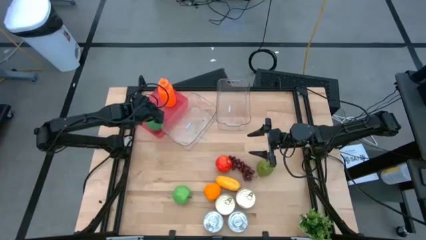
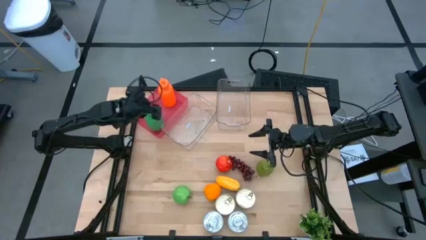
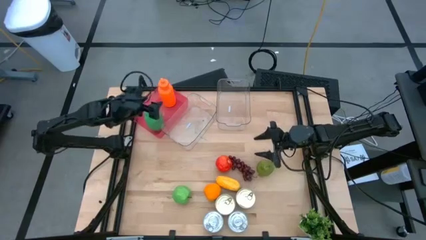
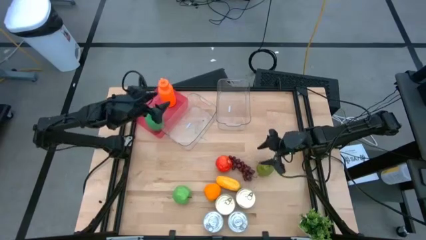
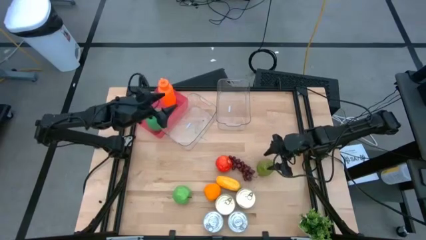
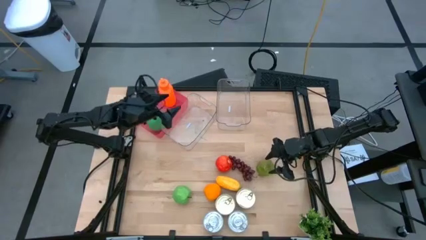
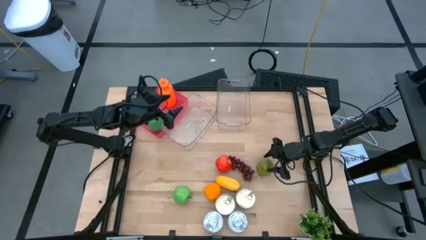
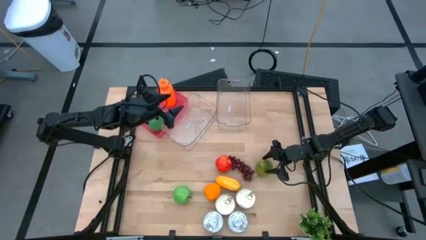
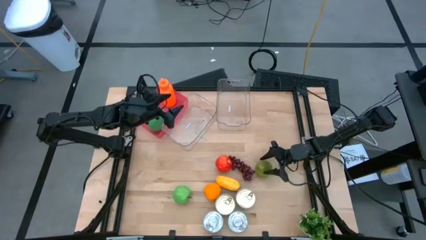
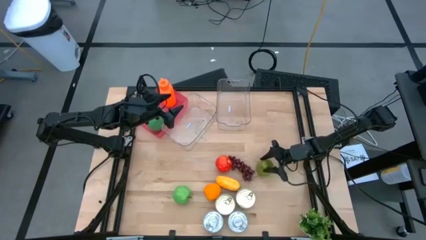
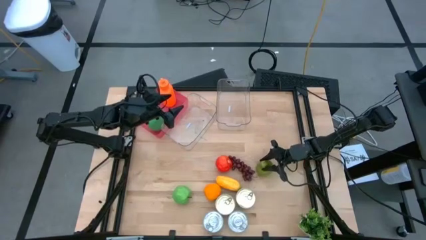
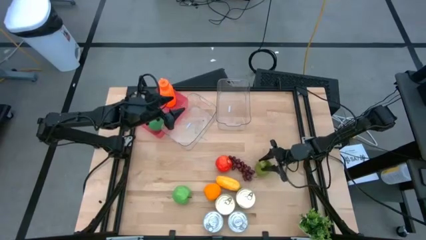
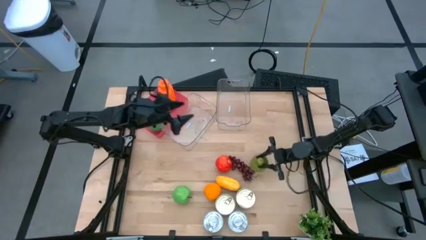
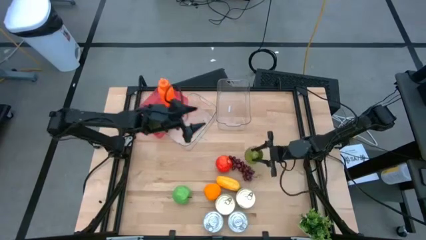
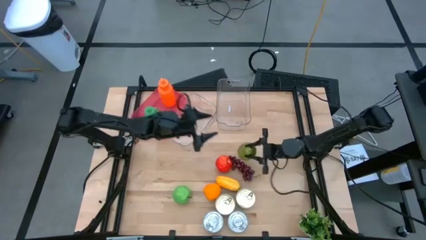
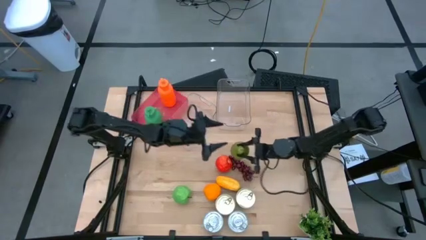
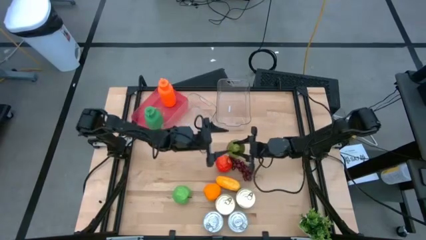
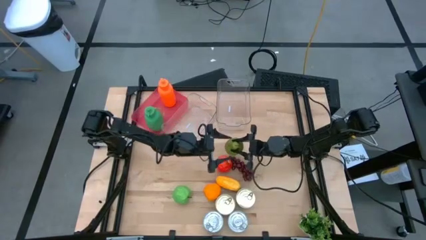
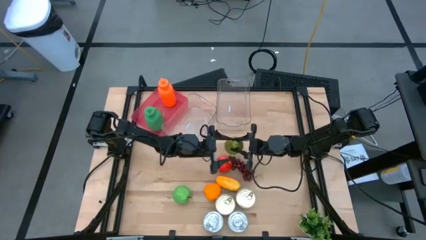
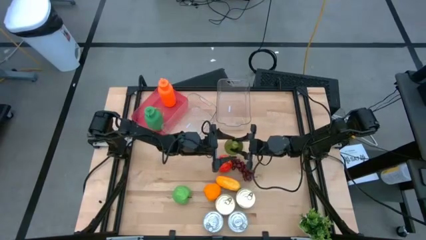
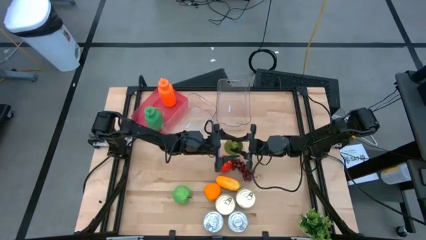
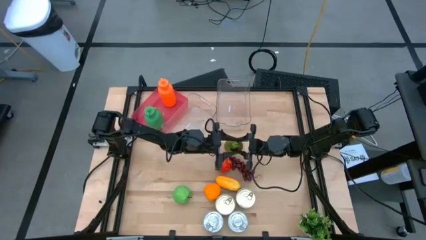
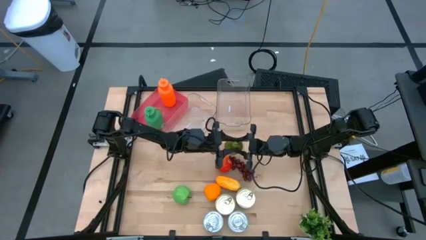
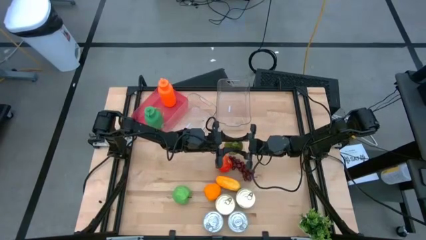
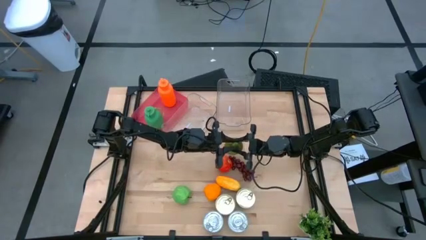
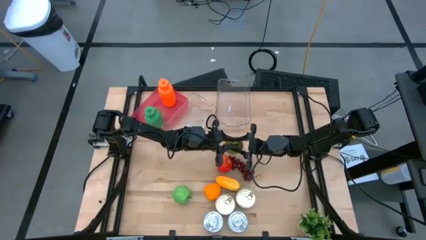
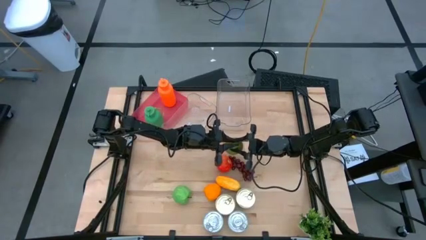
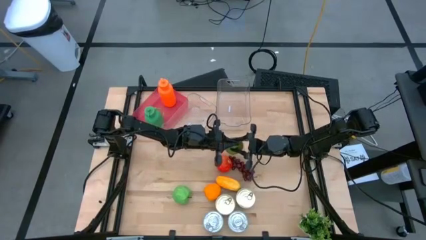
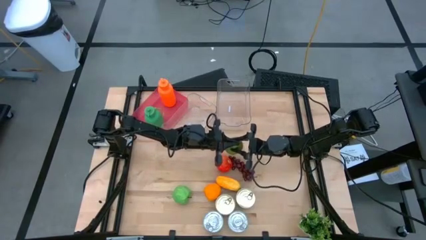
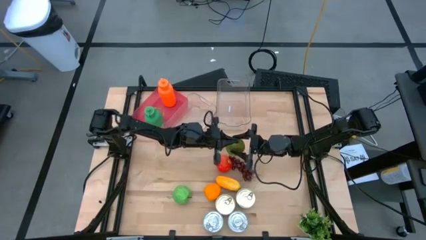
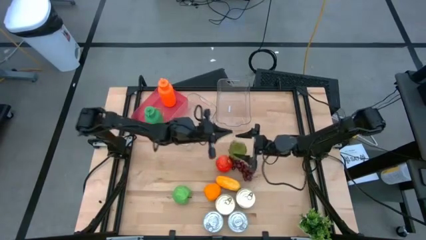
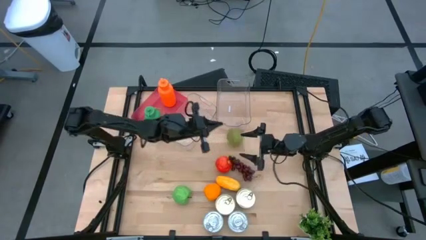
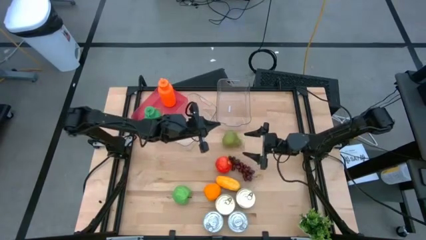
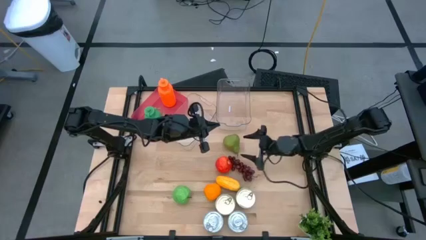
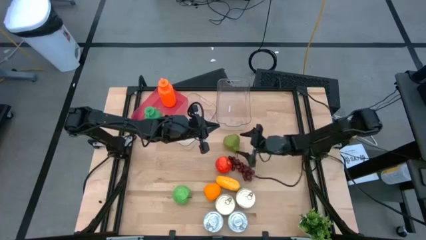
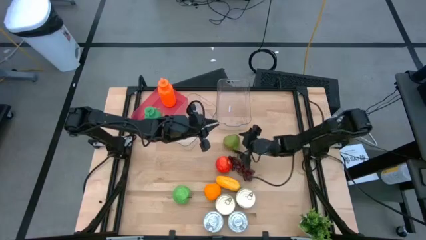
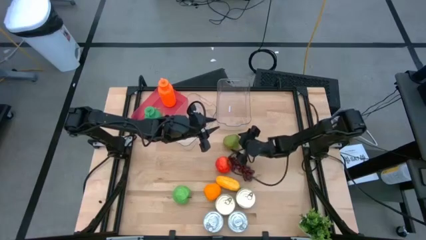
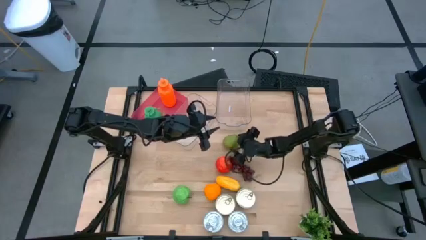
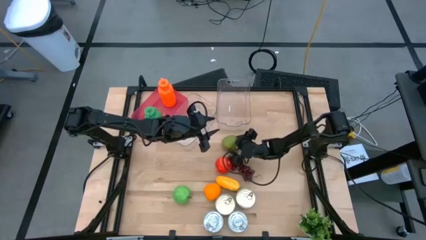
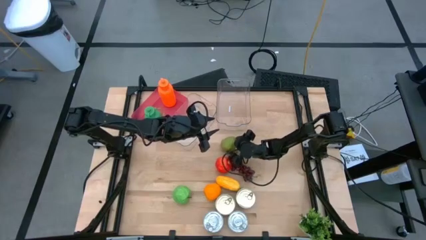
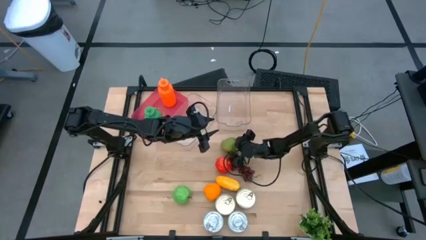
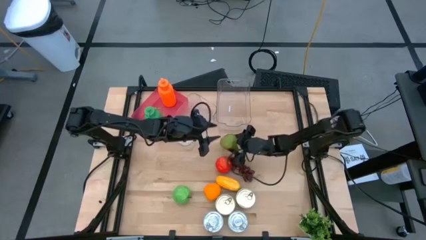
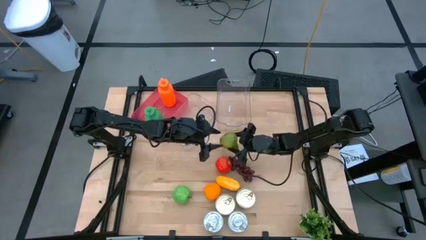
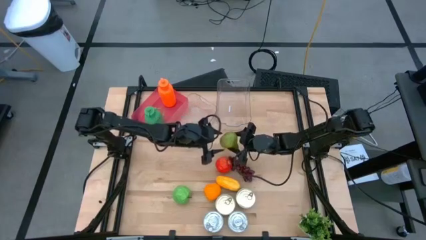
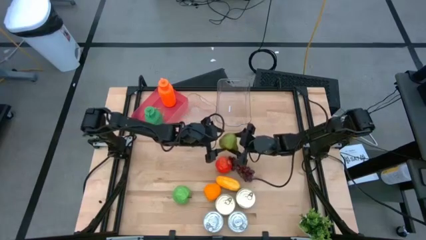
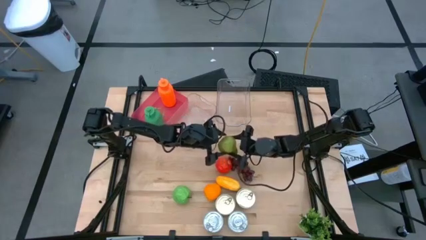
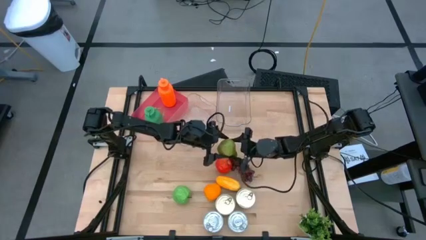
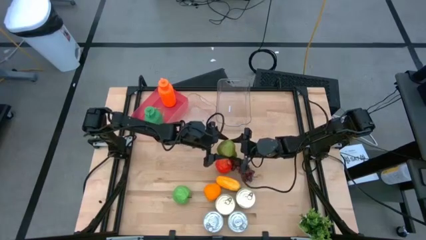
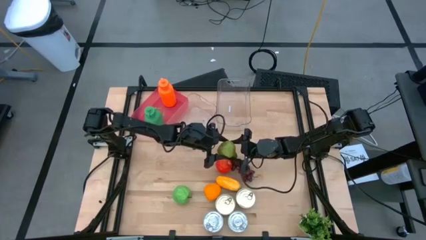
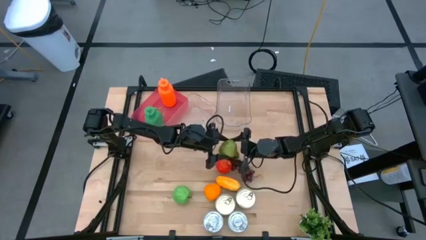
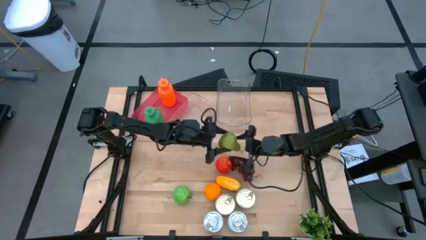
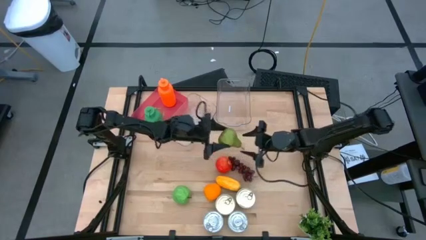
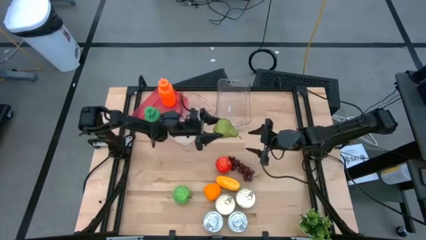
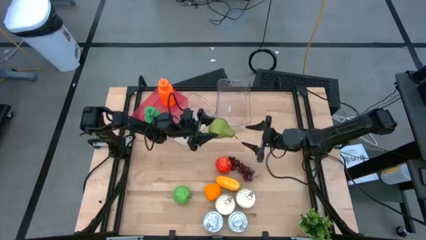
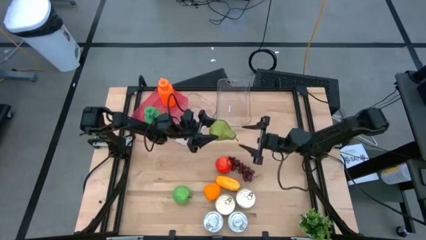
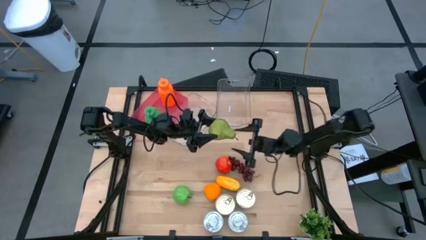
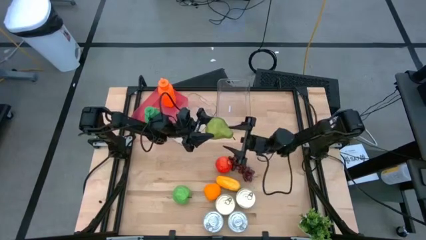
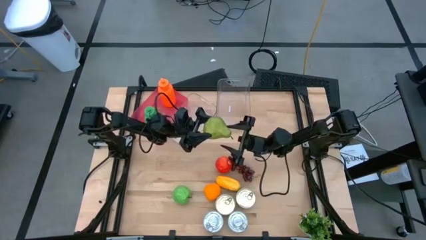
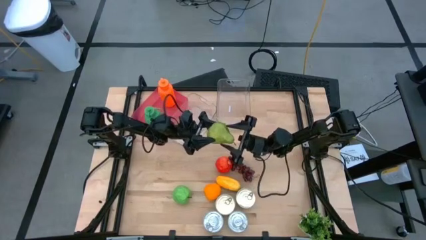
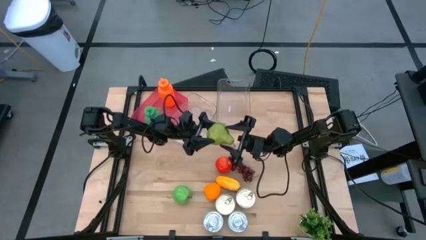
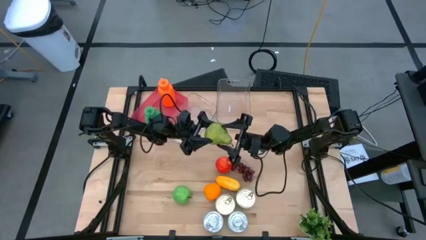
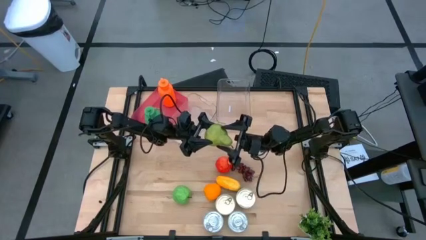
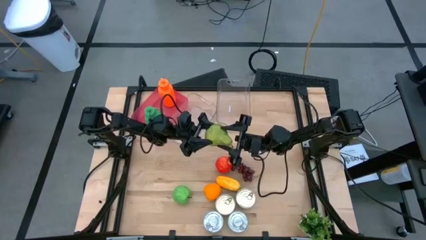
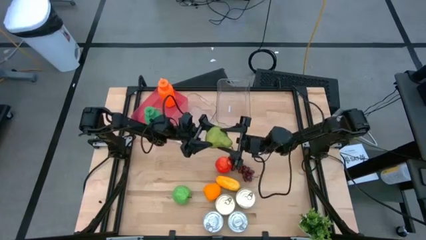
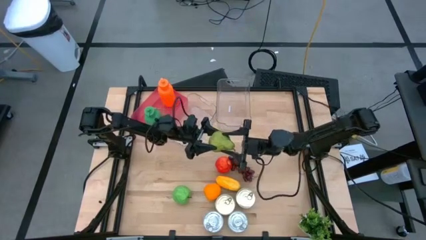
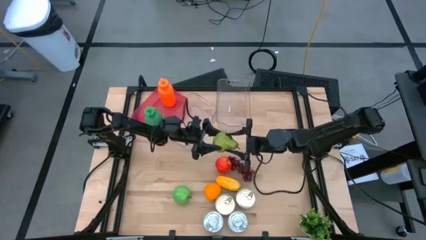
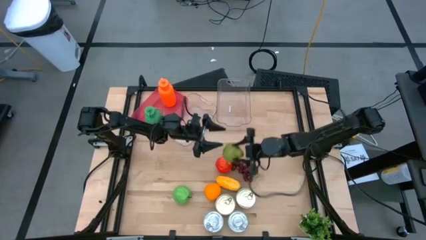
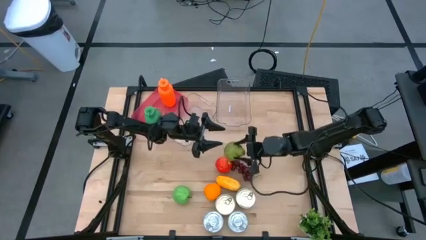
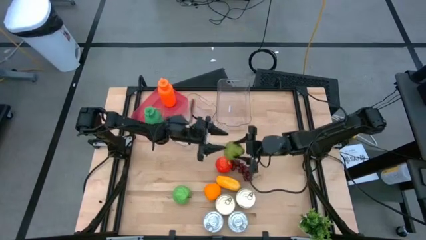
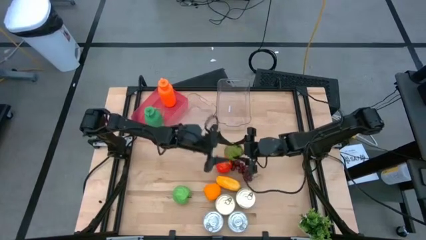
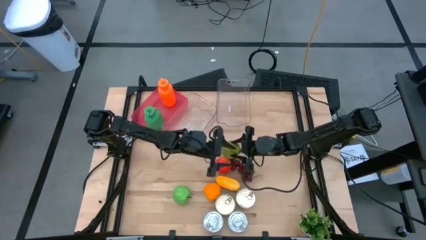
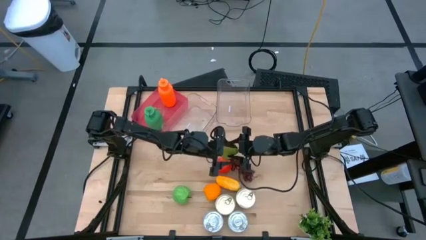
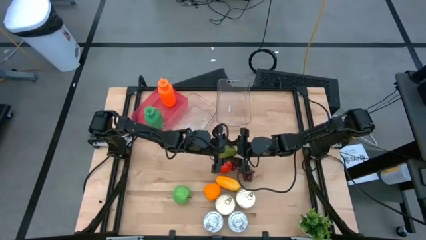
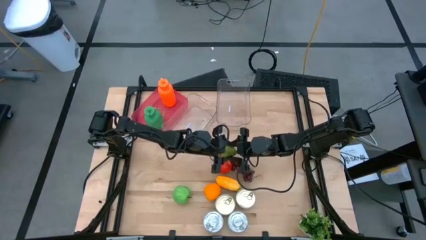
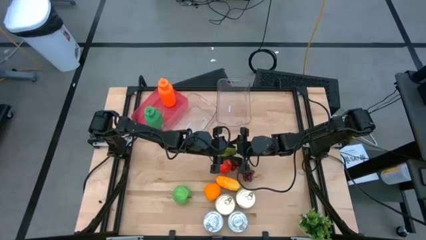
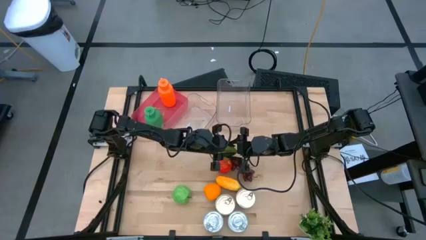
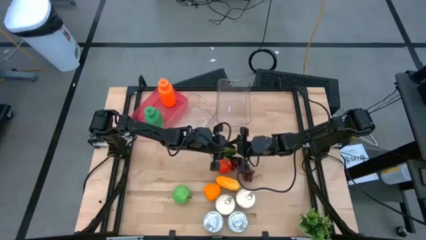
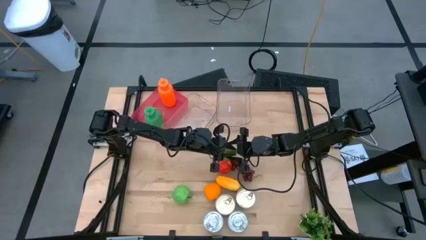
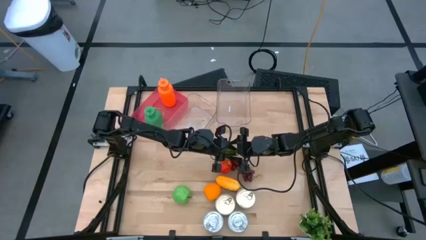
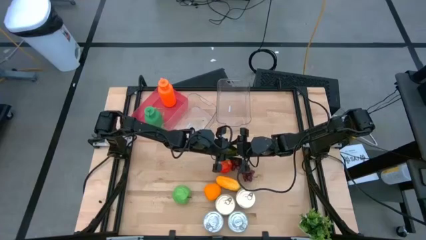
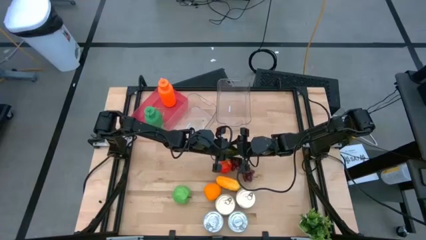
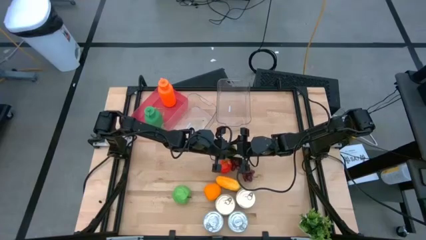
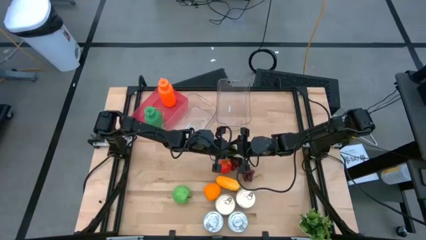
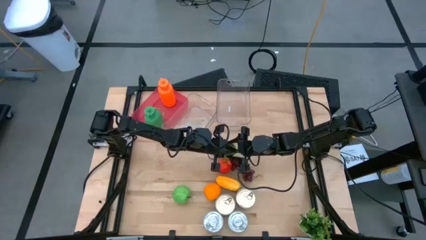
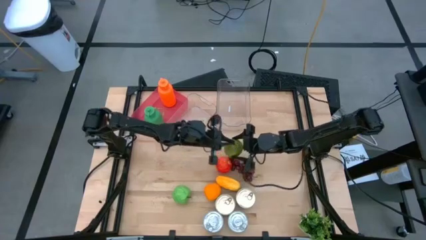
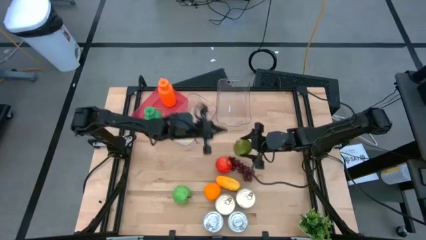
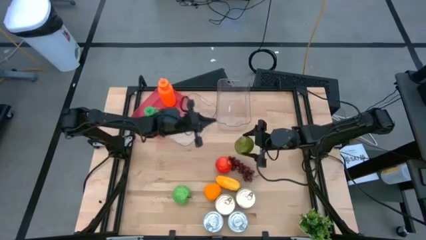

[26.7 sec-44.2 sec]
Task: Pick & Place Food Item
Put the green pear into the left transparent bin
